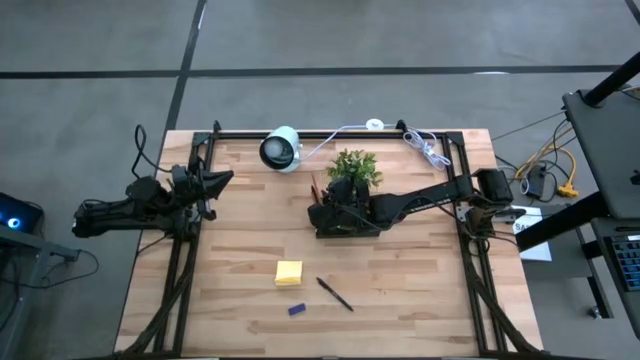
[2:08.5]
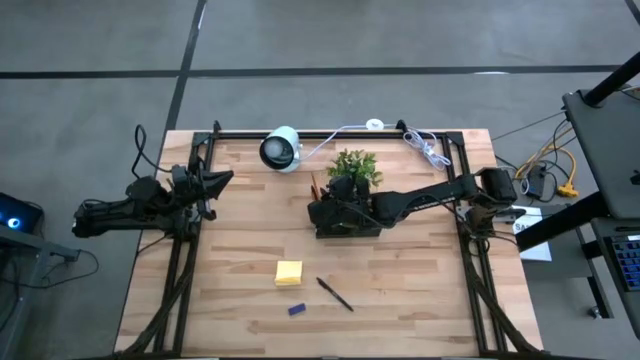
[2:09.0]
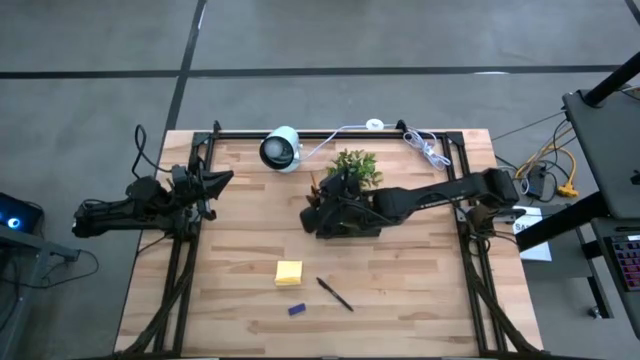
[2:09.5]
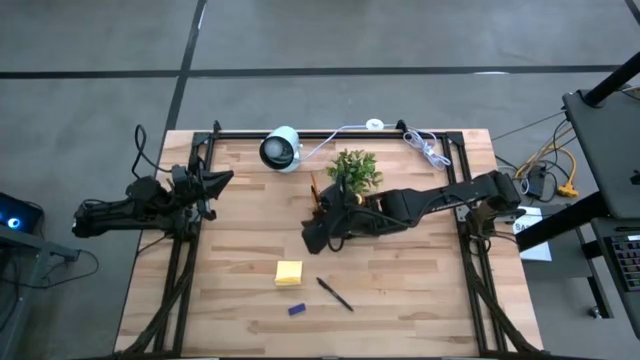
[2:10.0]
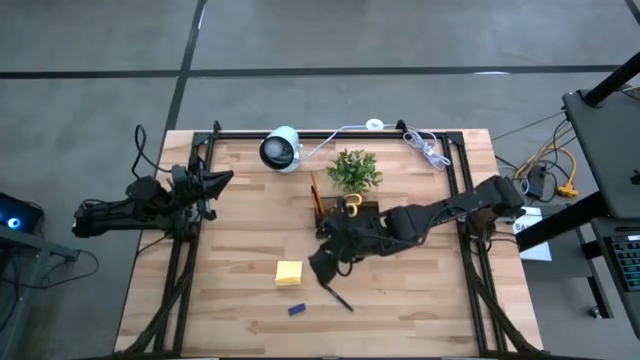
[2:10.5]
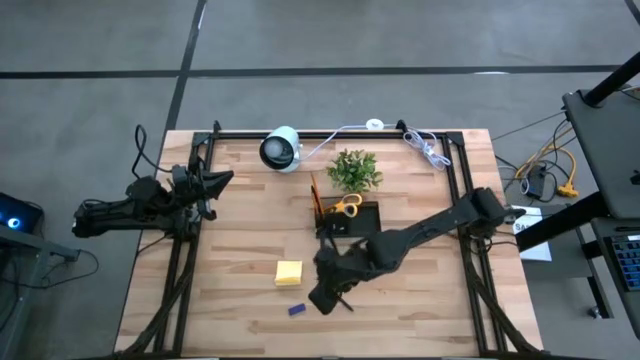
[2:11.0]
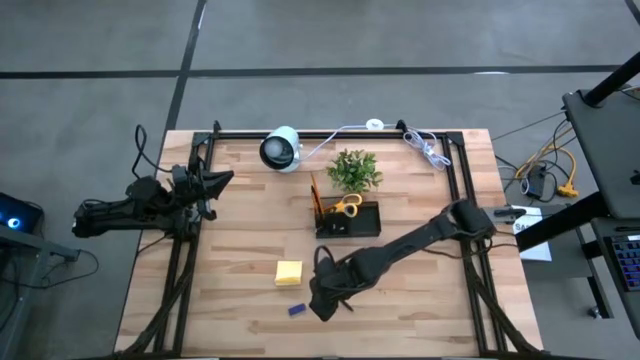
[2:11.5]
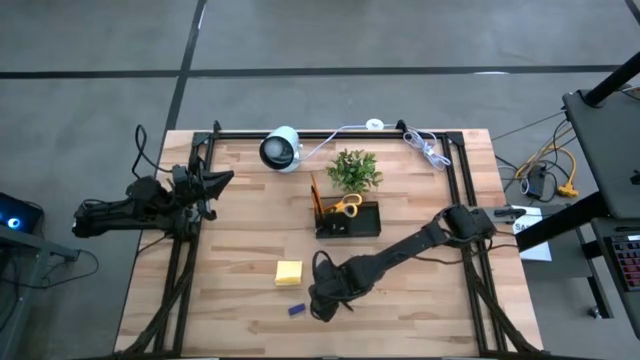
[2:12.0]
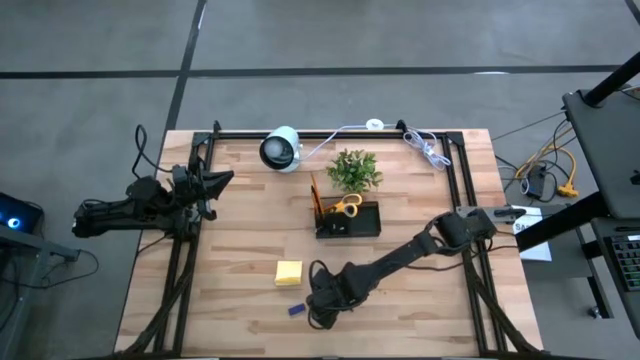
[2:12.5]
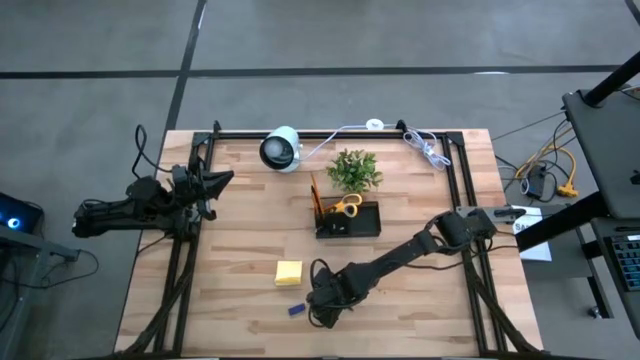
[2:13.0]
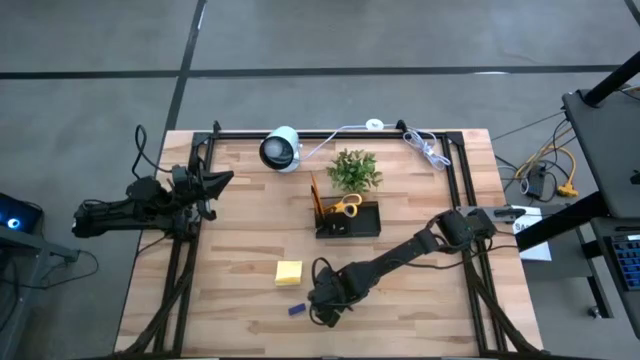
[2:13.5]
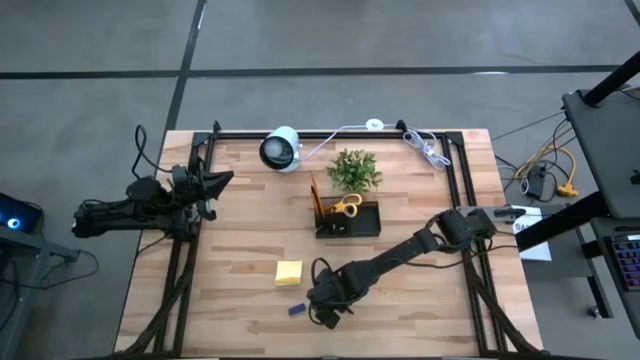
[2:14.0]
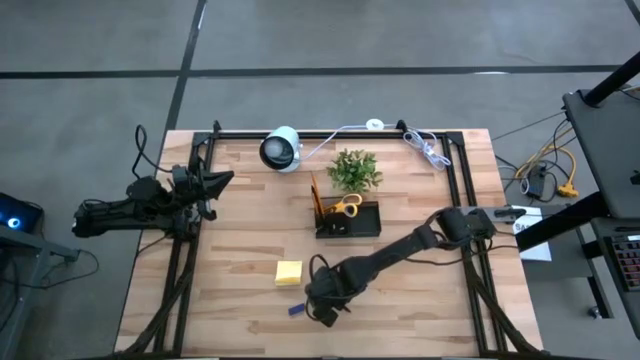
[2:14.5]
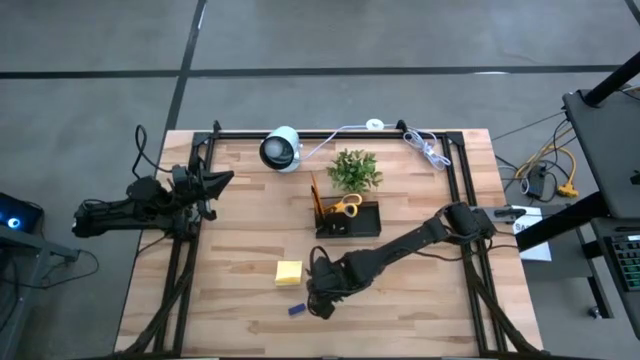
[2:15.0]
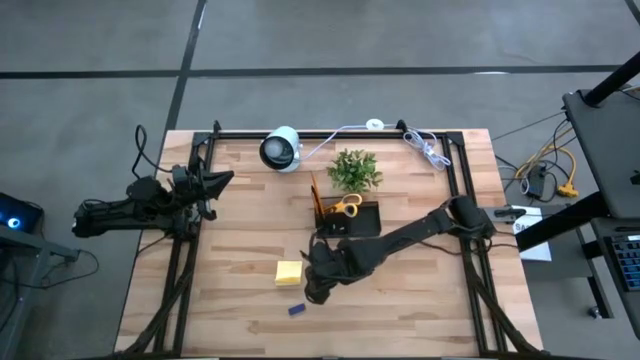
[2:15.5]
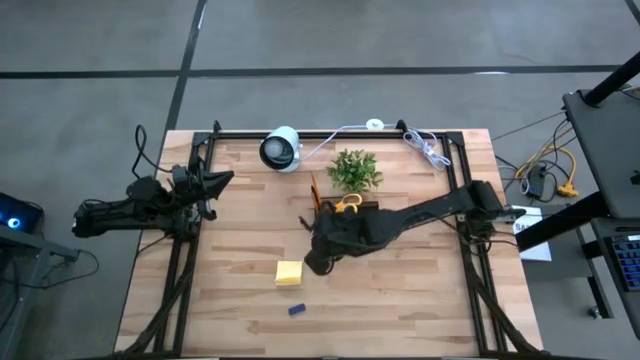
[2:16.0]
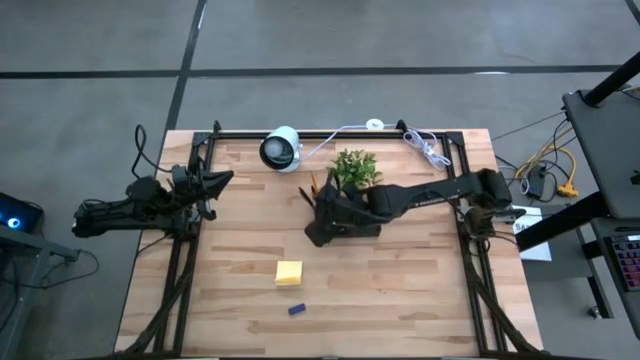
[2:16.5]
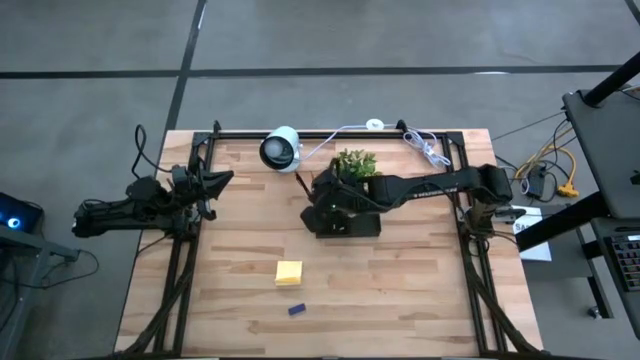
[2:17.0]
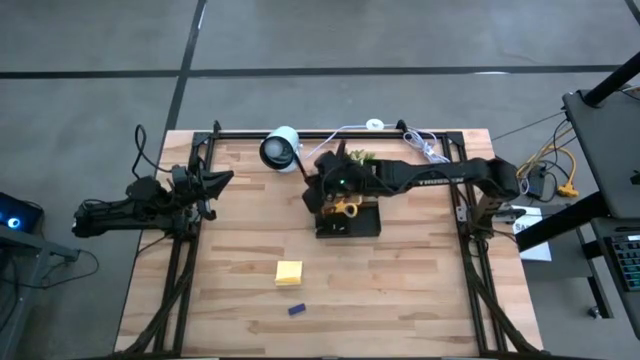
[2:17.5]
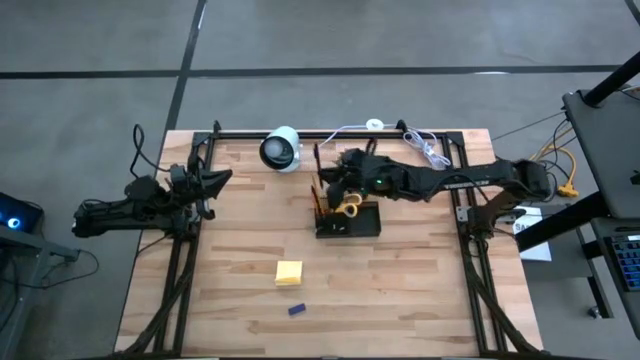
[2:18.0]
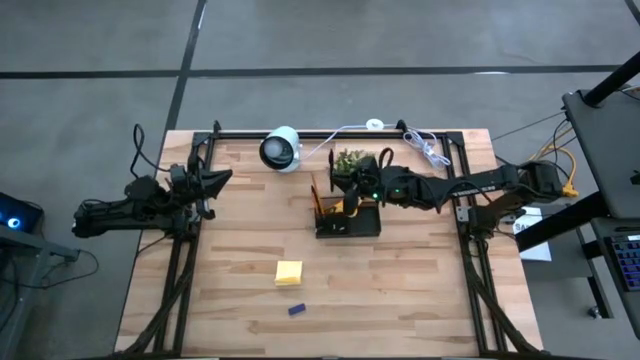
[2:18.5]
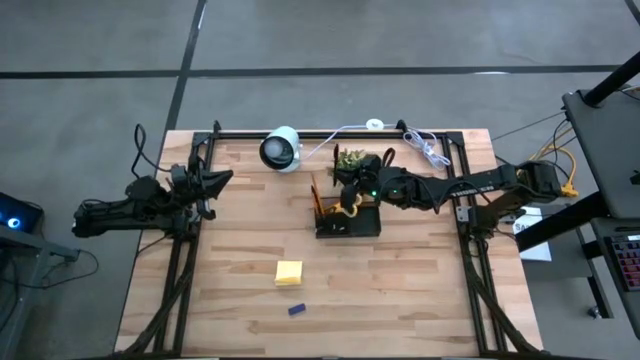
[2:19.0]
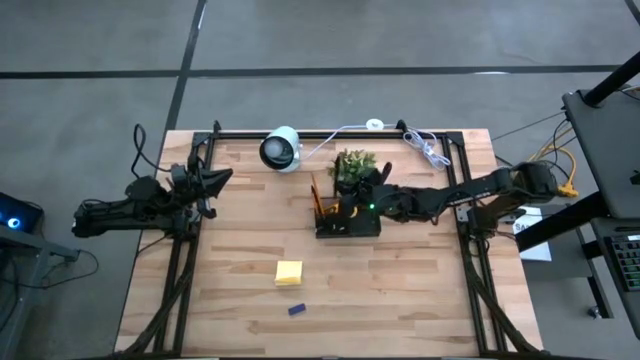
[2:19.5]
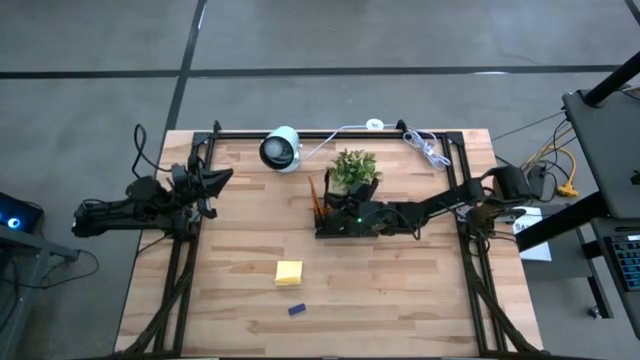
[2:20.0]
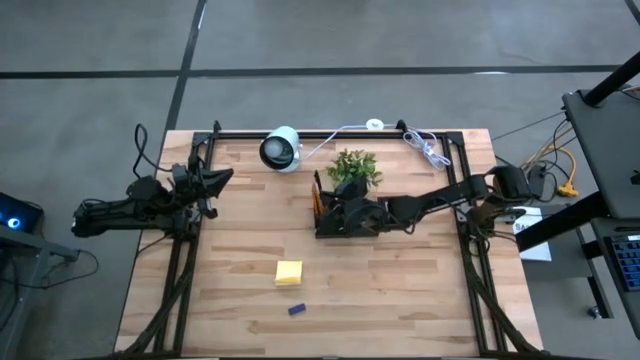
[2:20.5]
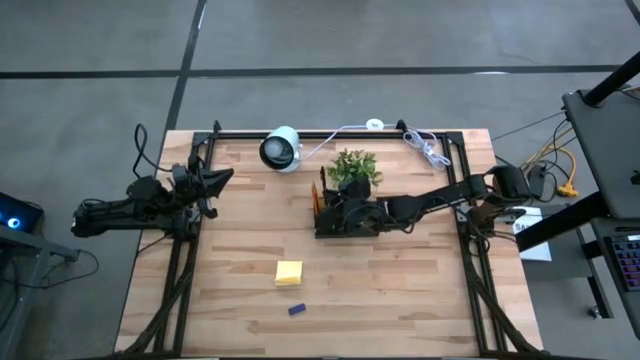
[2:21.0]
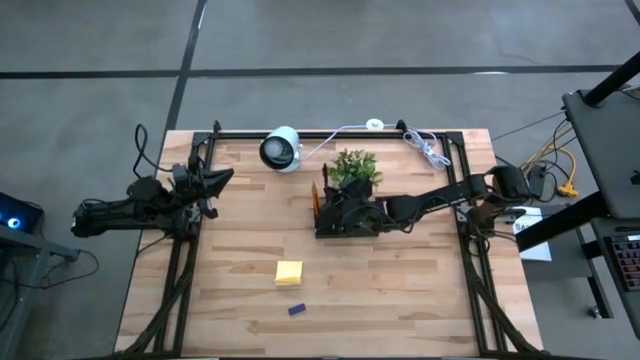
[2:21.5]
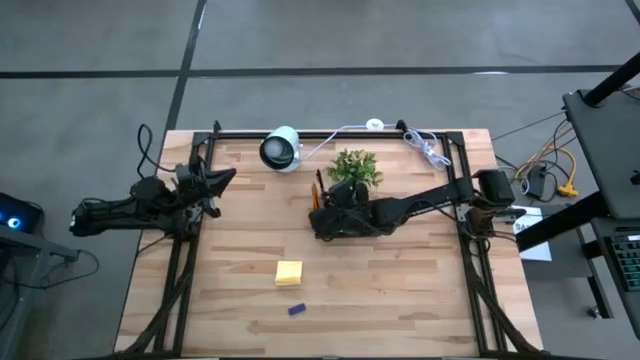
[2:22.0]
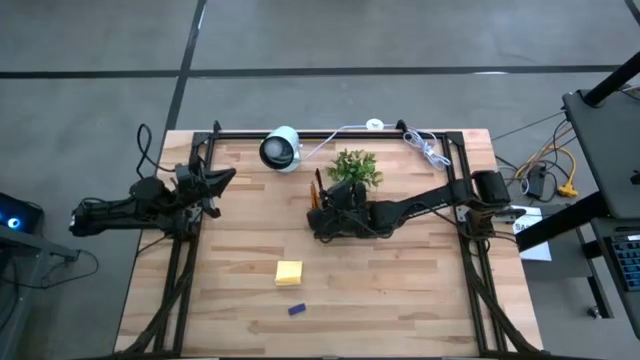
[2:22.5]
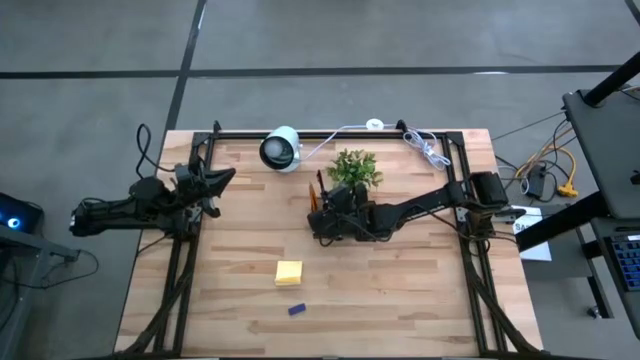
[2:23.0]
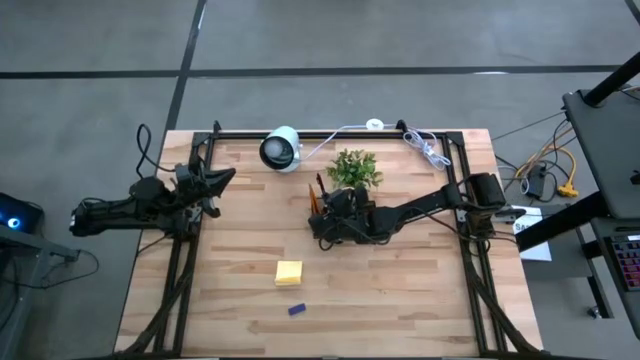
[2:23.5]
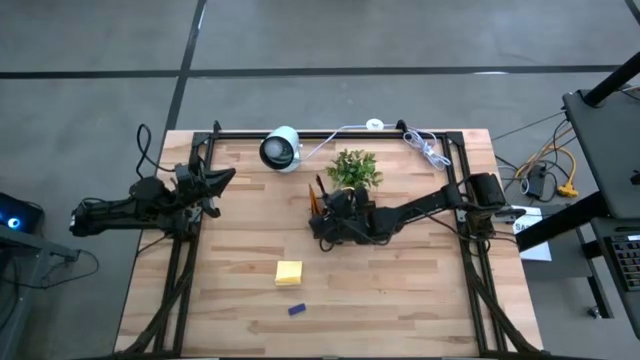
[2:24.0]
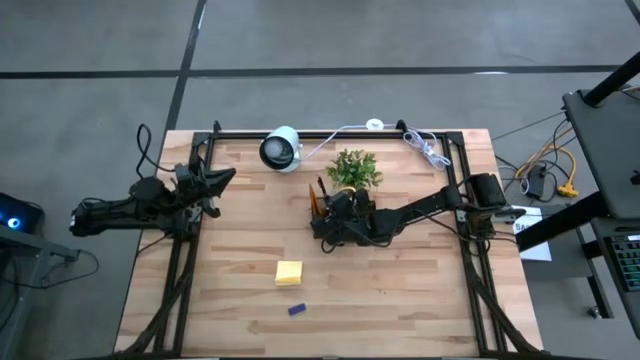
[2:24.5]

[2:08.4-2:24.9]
Task: Pick and place office supplies into organizer
Put the black pen into the black desk organizer

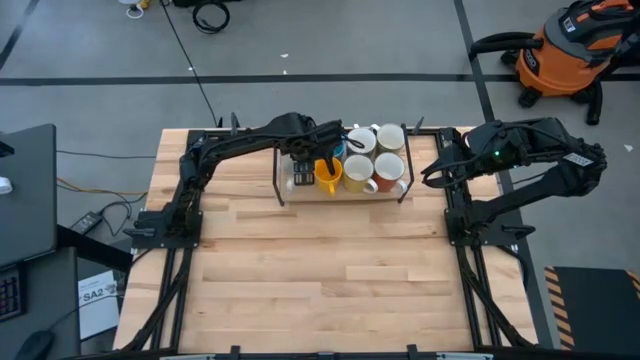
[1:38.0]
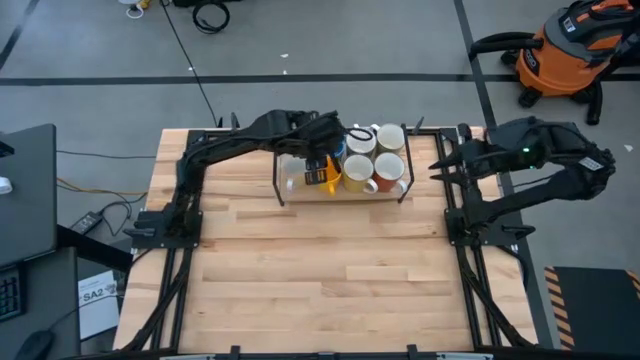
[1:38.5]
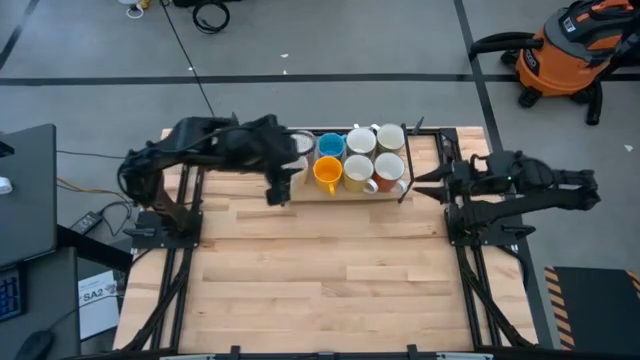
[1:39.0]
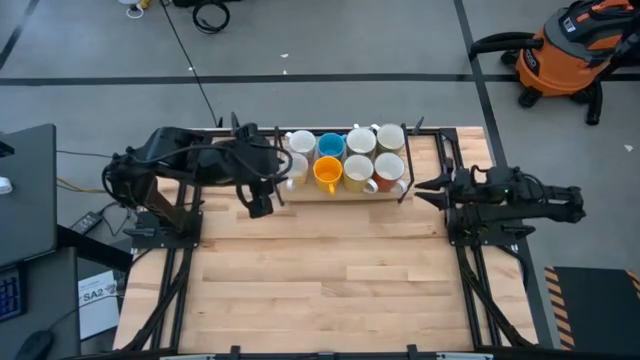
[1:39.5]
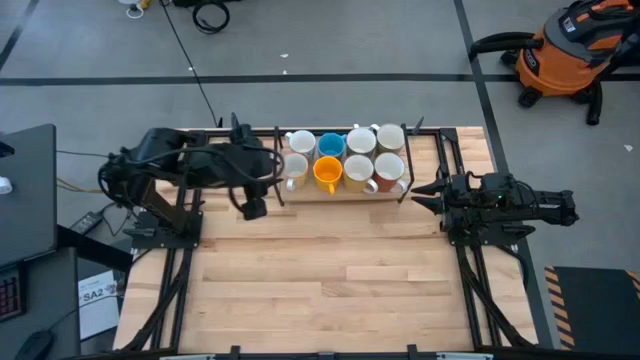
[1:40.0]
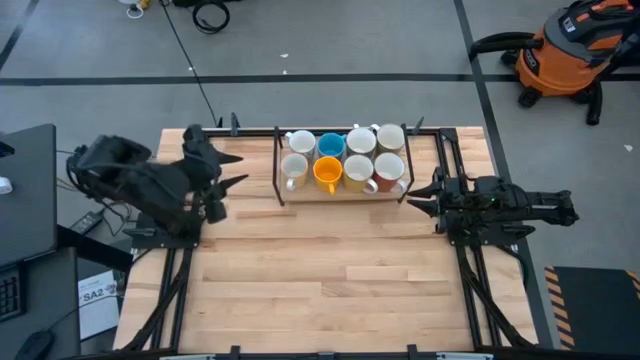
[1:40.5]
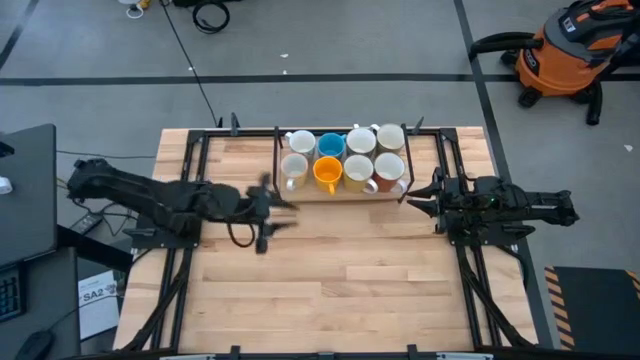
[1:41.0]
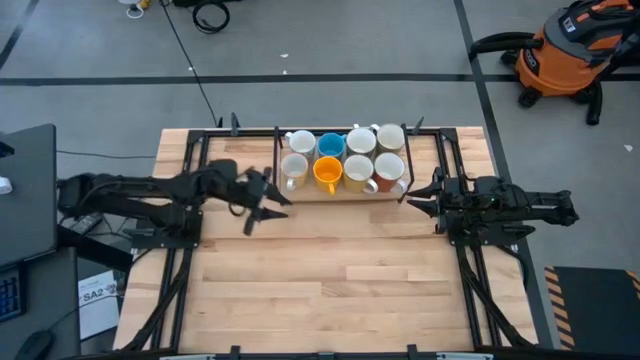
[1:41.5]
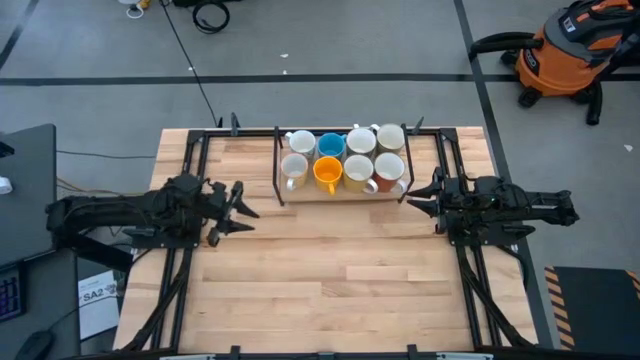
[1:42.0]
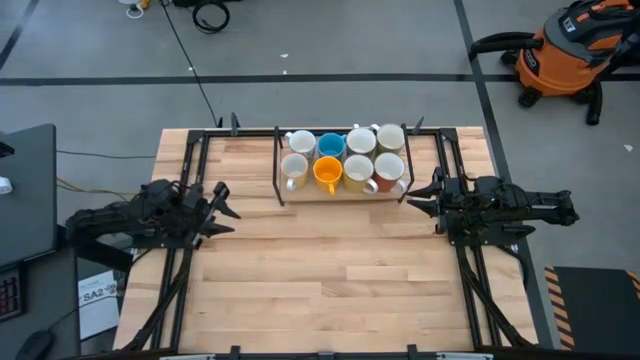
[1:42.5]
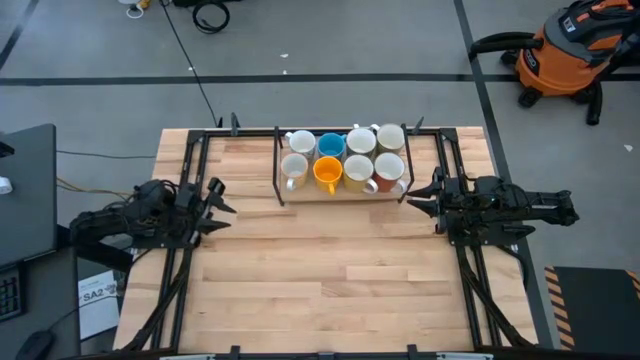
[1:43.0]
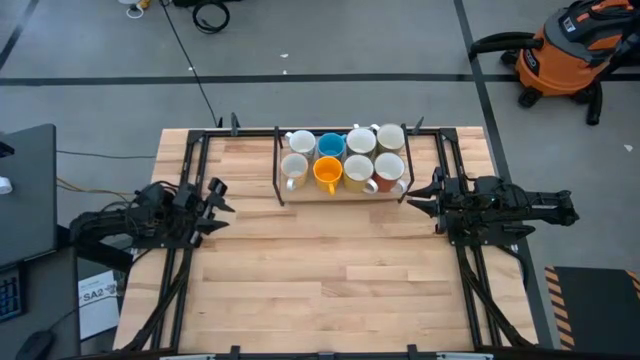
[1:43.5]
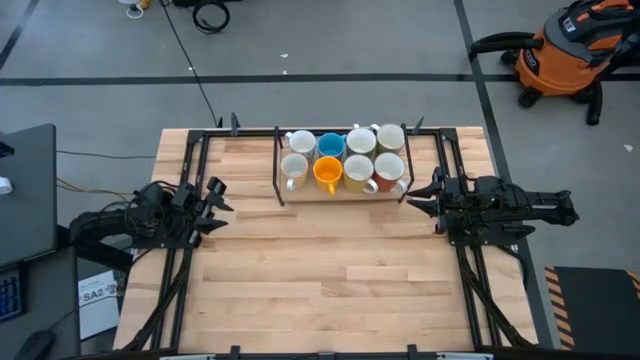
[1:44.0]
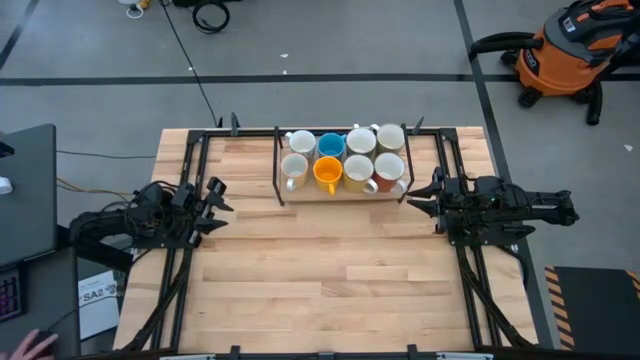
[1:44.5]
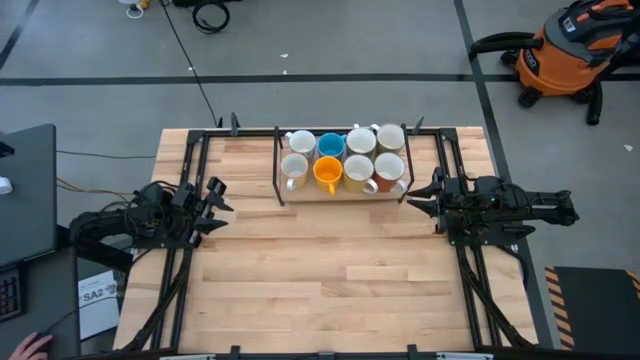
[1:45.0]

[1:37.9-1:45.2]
Task: Place coffee mugs
Return to Home Position
